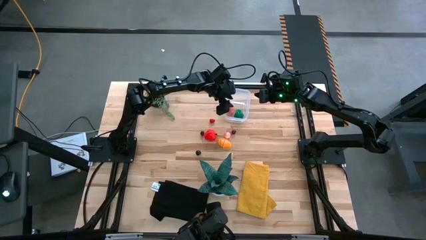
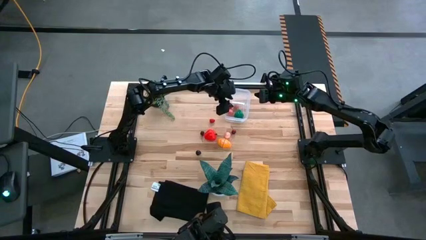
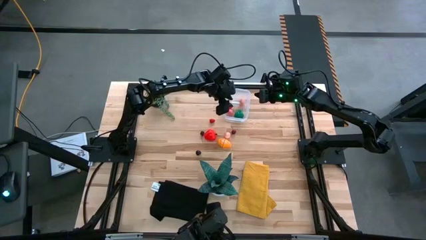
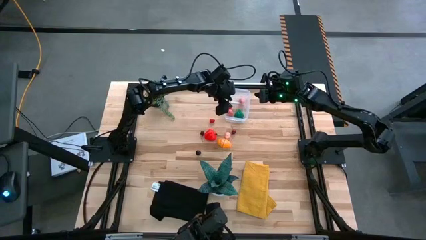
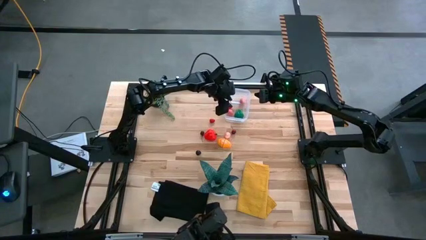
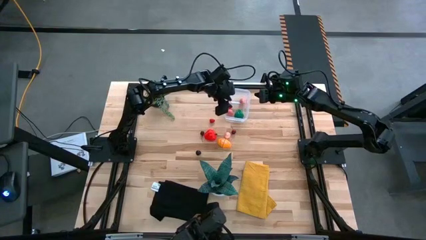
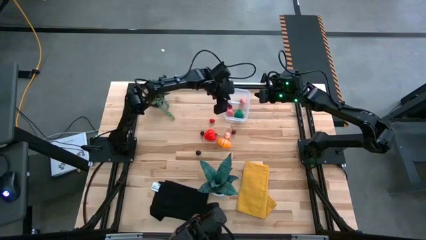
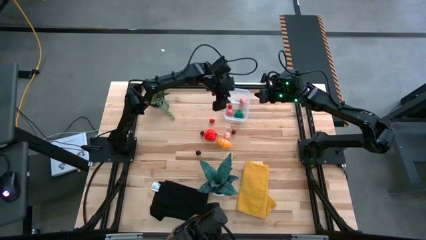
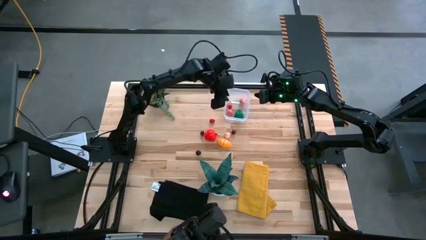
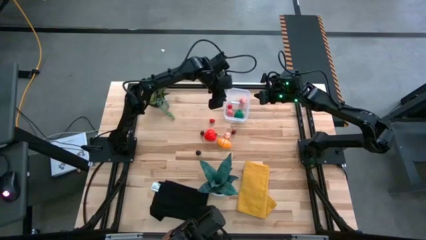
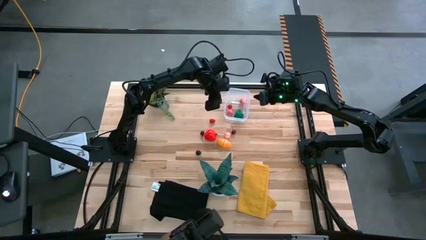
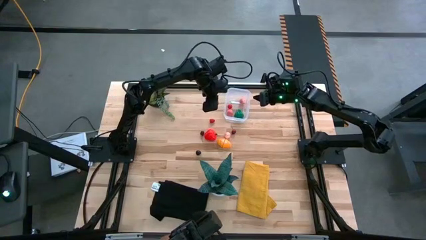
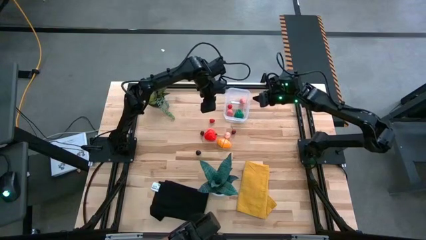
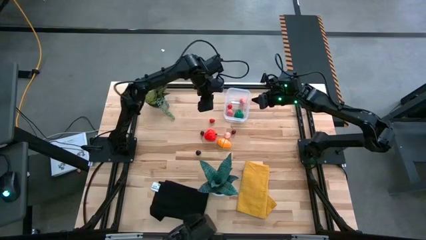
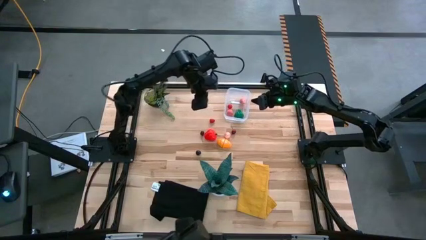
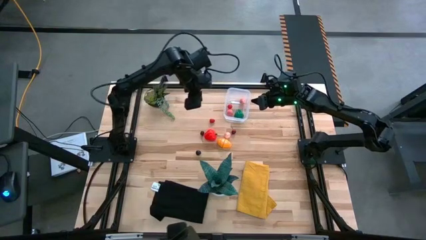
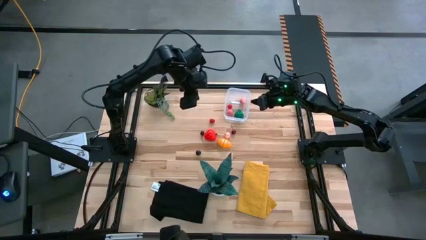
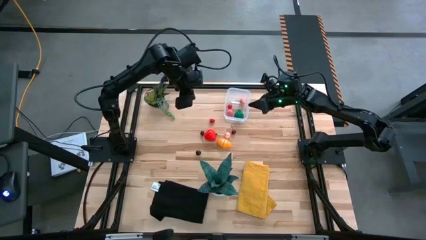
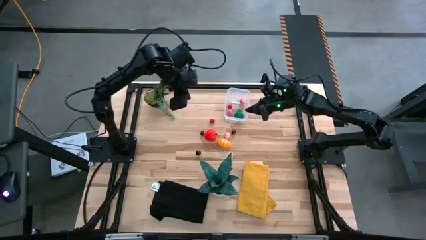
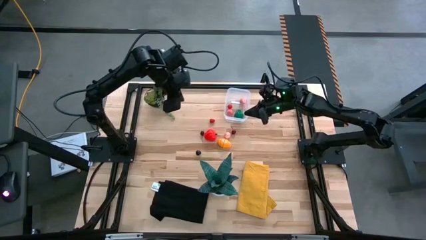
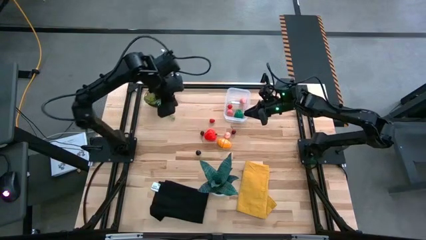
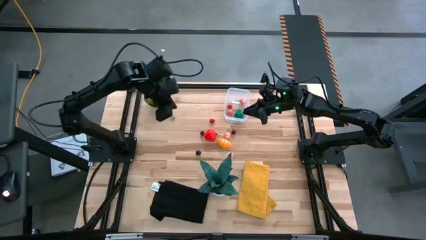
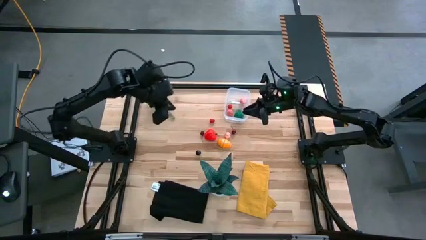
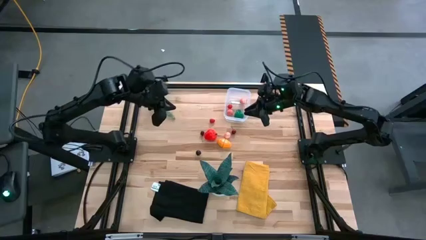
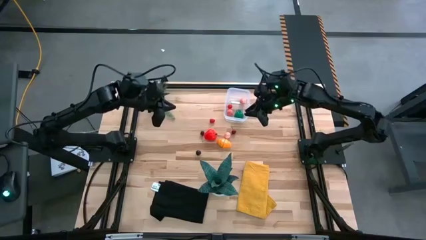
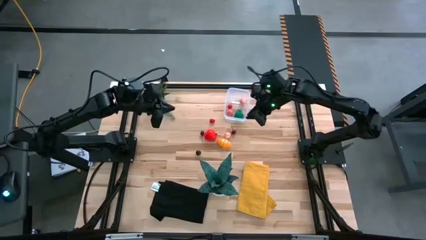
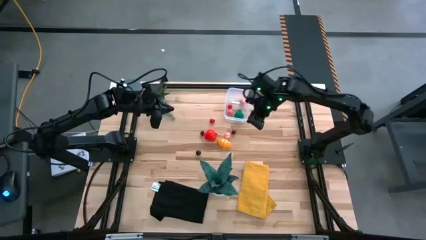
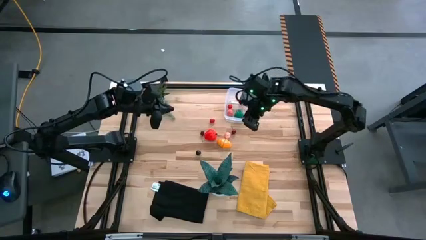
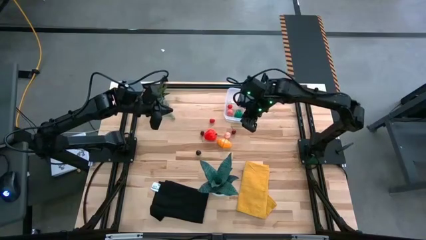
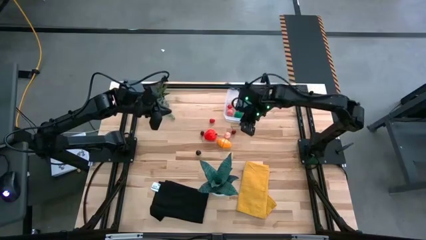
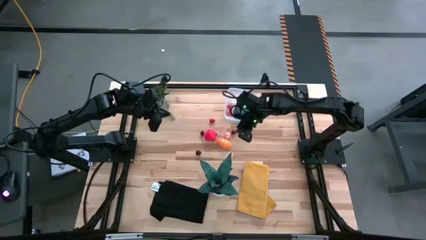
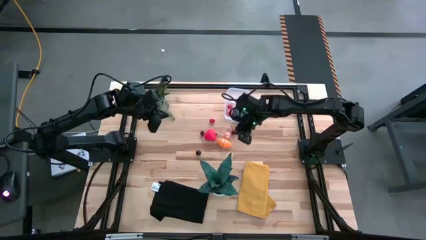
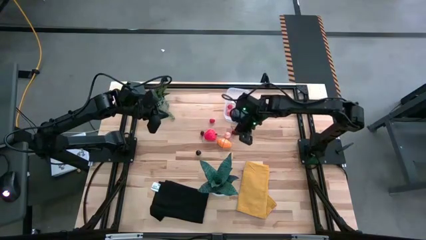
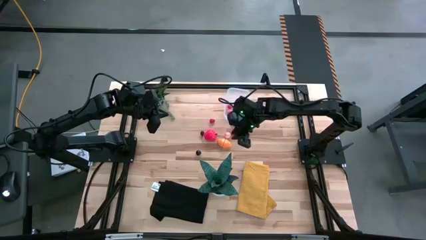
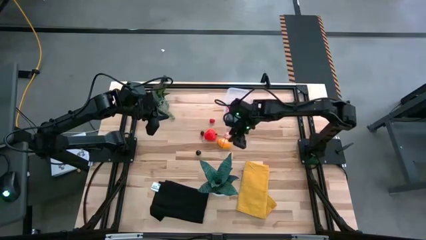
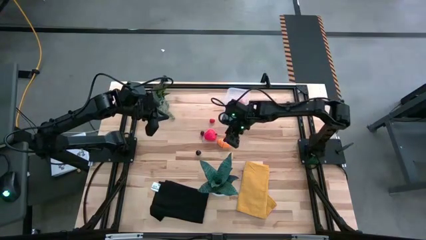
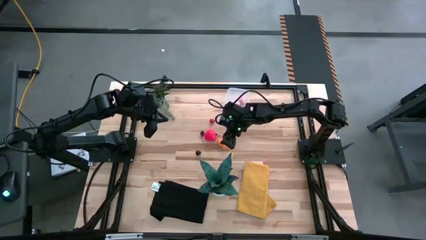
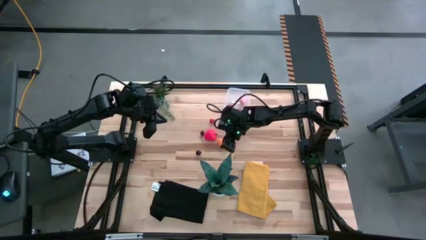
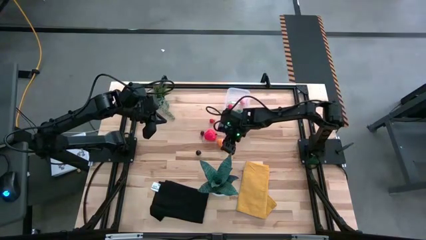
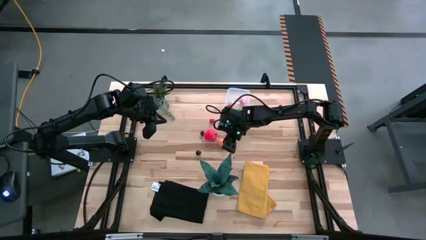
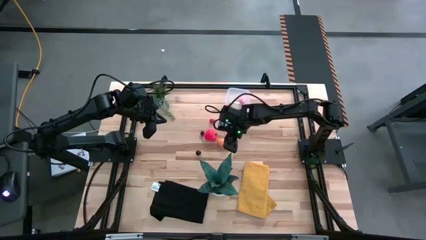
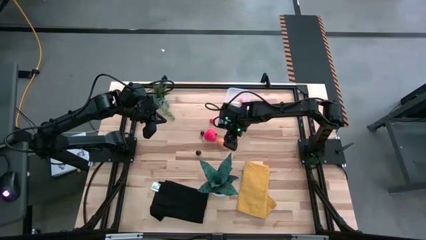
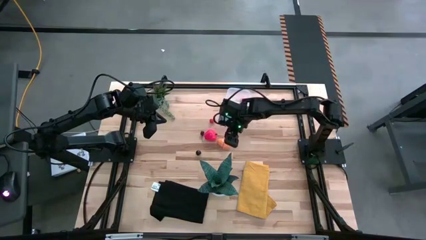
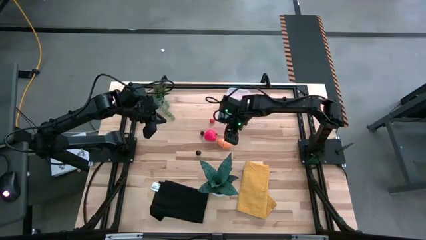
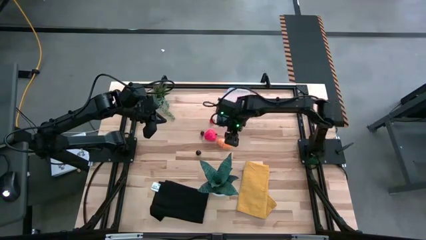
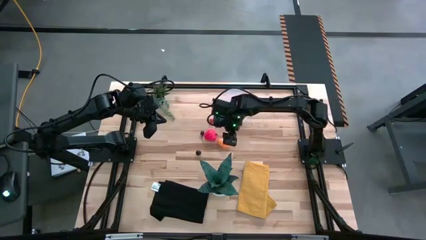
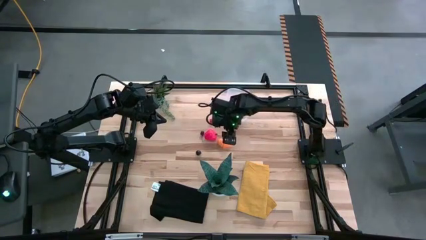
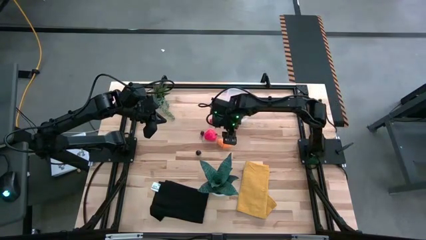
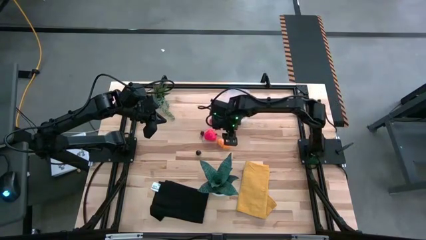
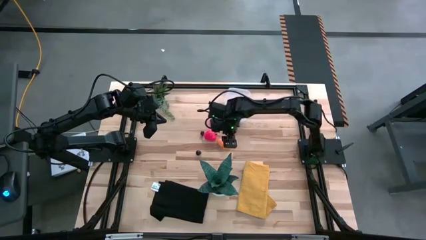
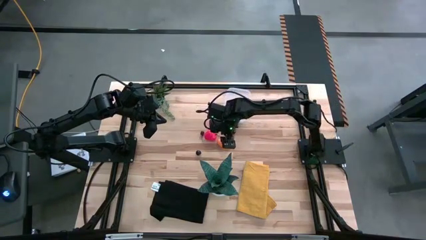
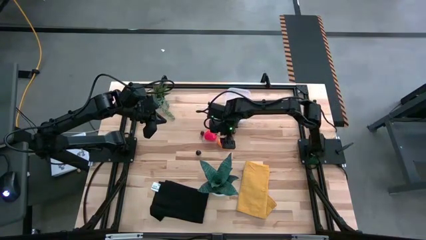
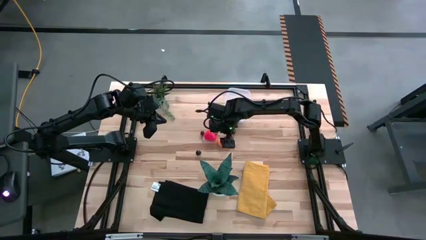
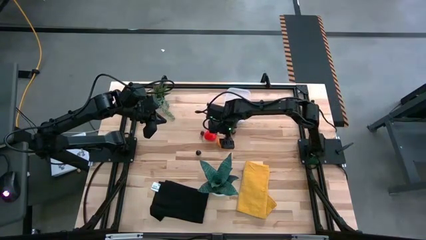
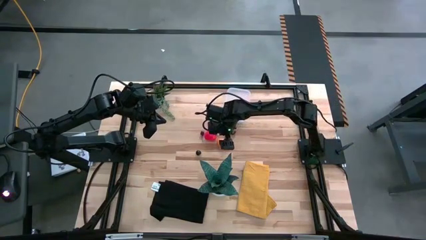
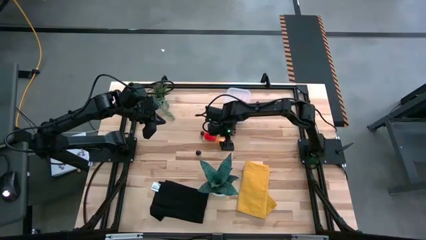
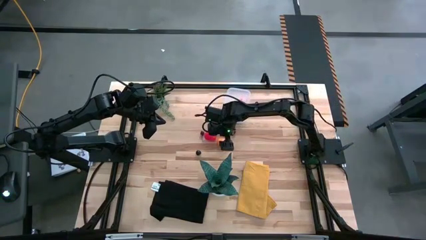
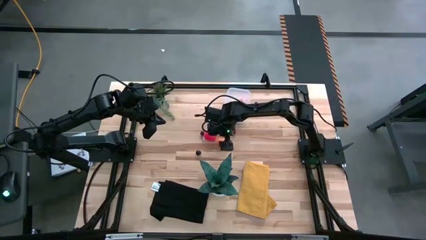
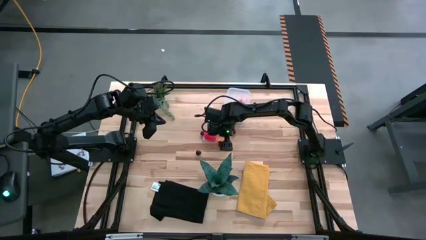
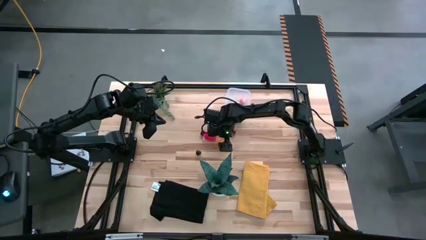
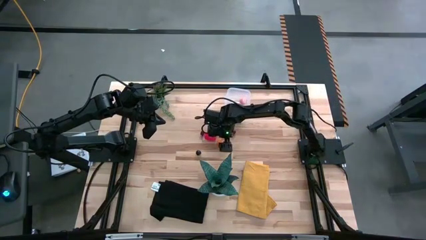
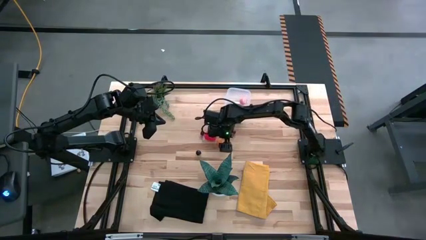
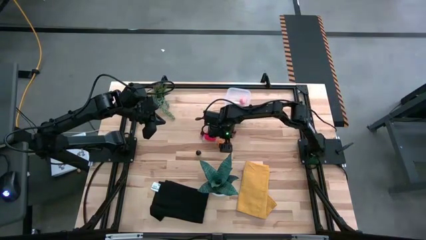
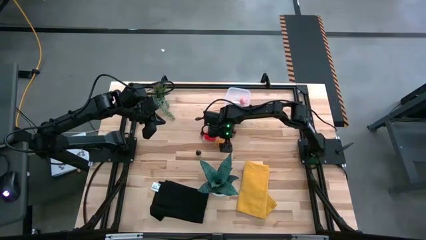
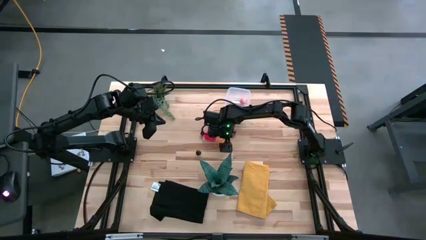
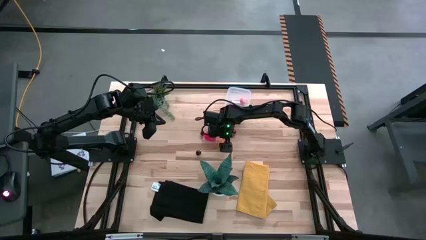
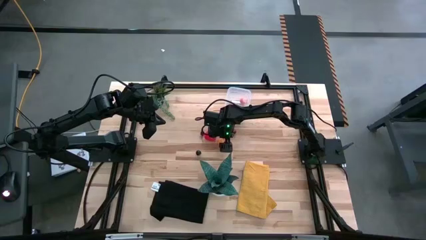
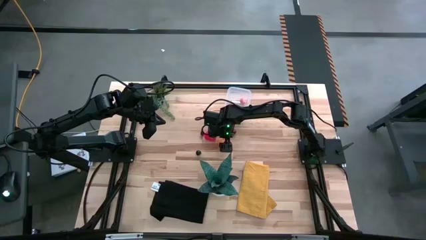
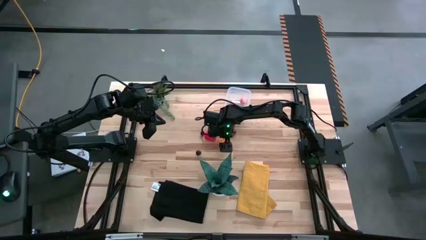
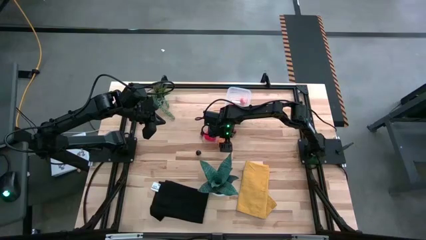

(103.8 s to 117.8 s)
Task: Pick and placing Produce into tupperware
Put the croissant into the transparent container

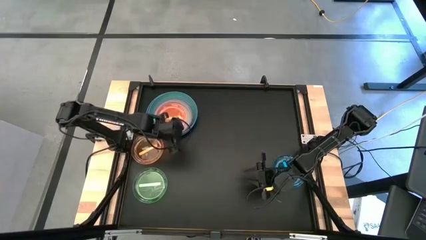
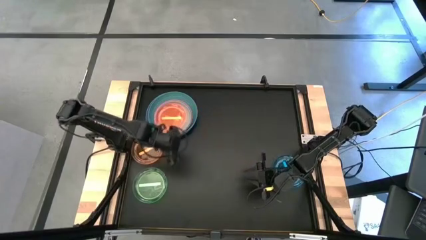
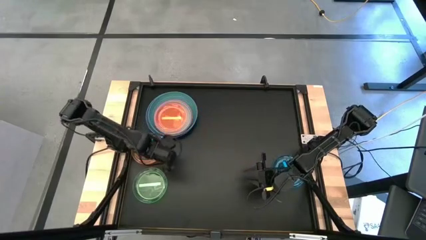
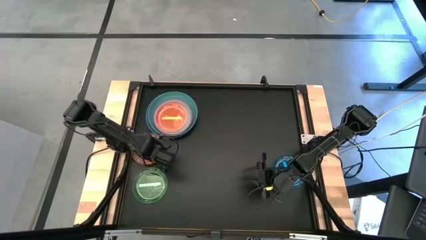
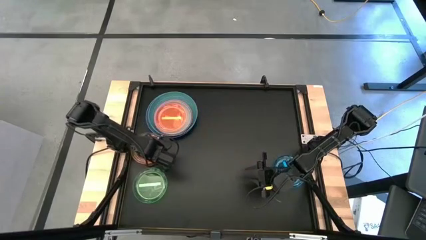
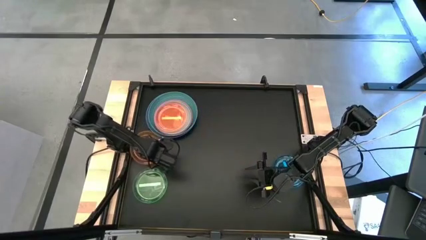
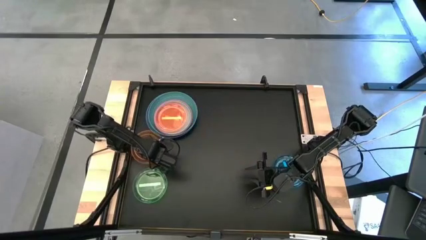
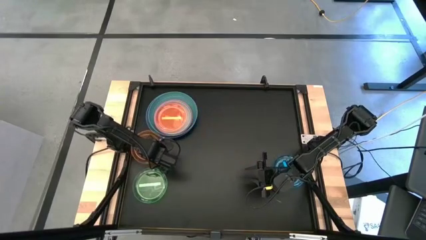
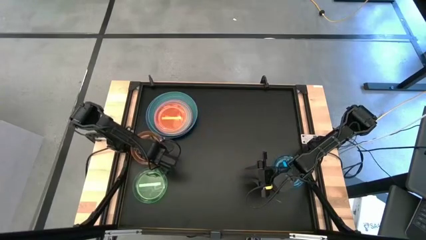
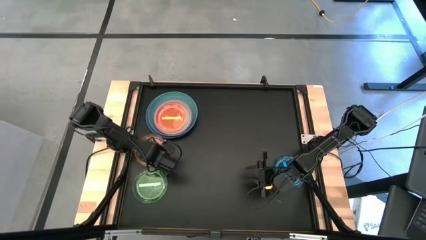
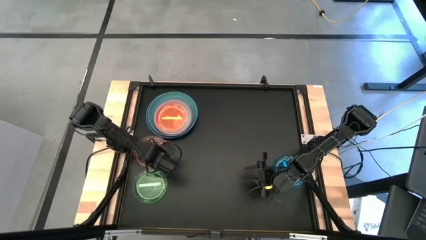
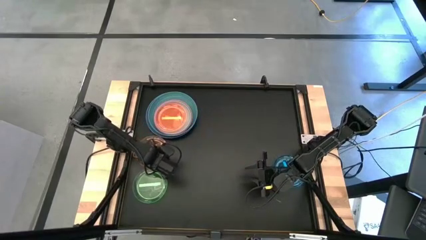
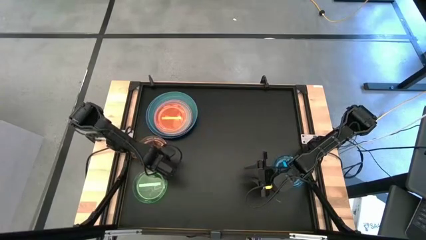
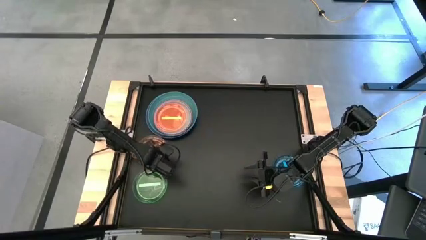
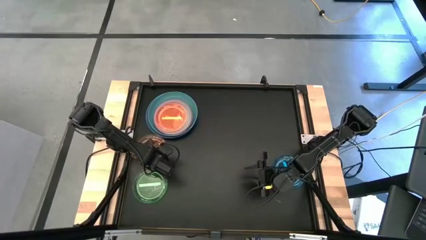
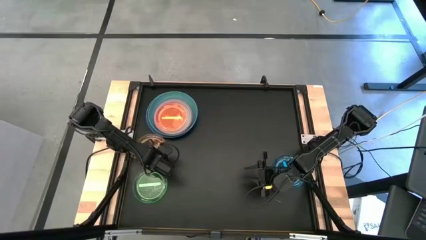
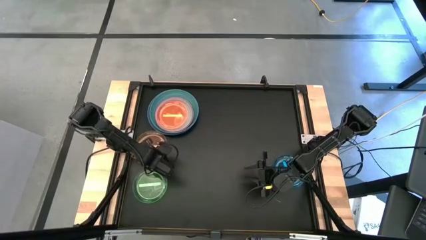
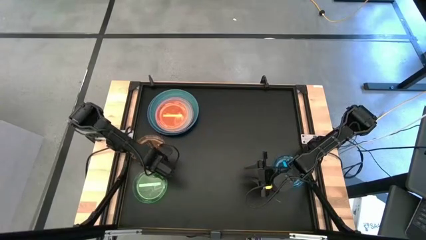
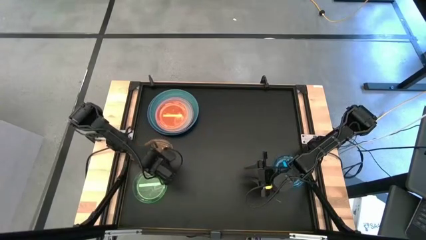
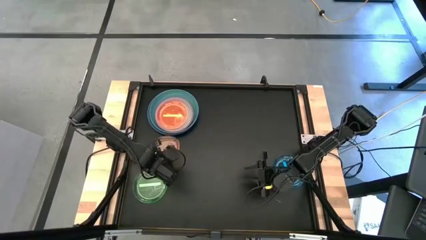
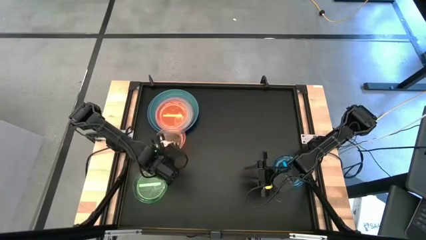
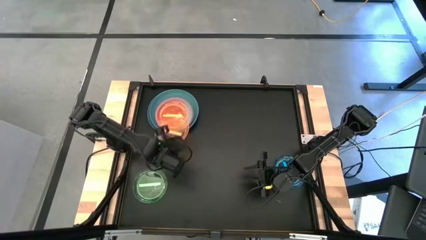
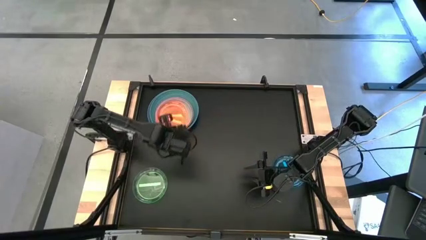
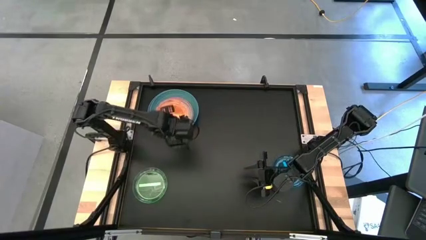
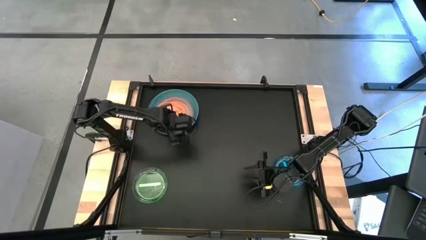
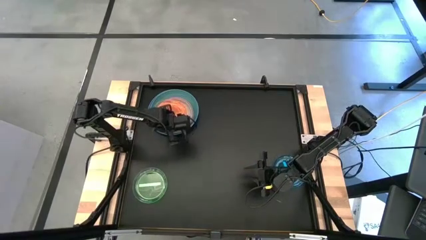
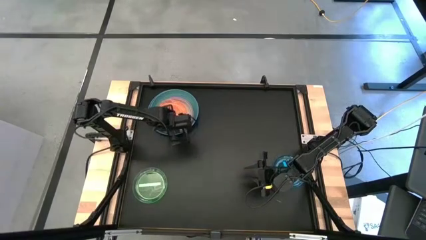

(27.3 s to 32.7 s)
Task: Stack plastic plates
Stack the orange plate on the orange plate
